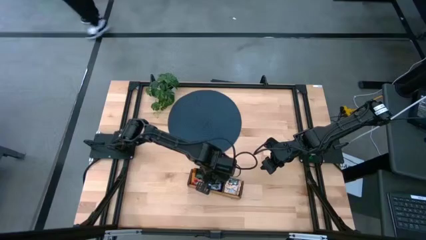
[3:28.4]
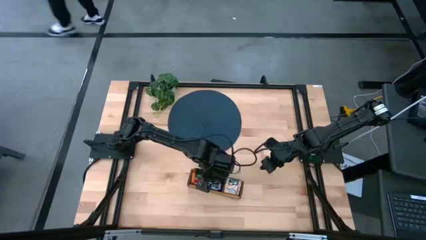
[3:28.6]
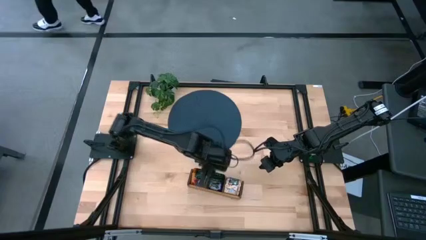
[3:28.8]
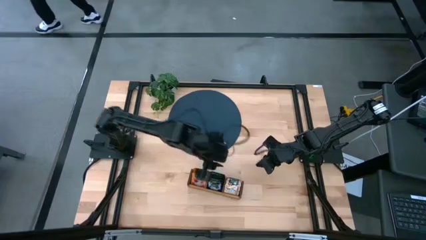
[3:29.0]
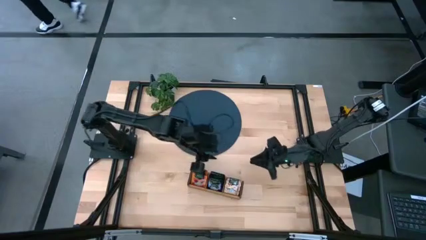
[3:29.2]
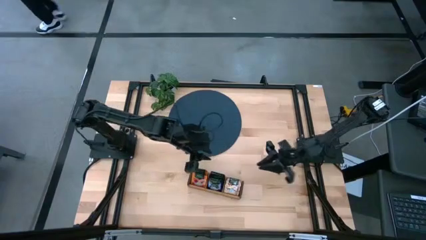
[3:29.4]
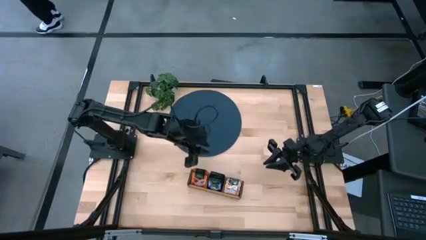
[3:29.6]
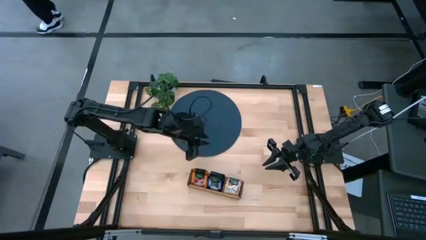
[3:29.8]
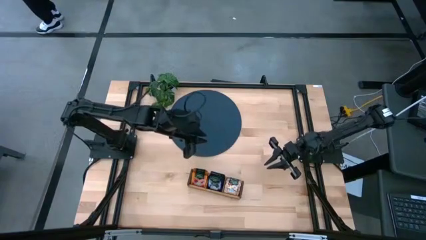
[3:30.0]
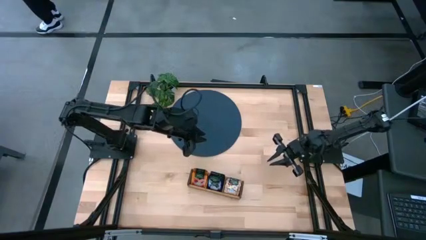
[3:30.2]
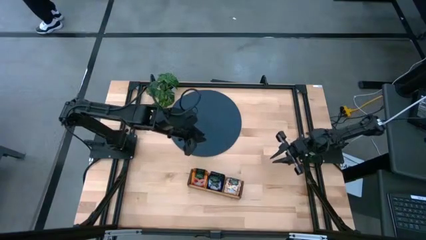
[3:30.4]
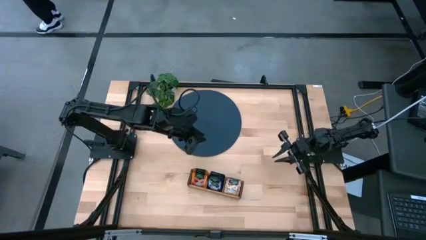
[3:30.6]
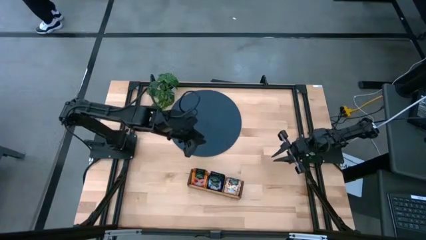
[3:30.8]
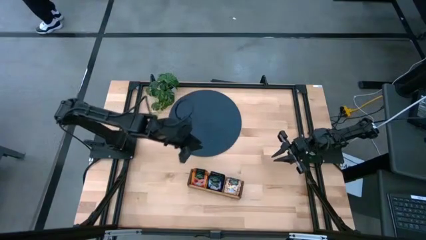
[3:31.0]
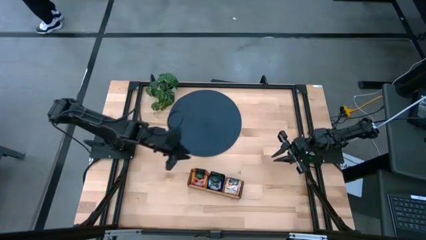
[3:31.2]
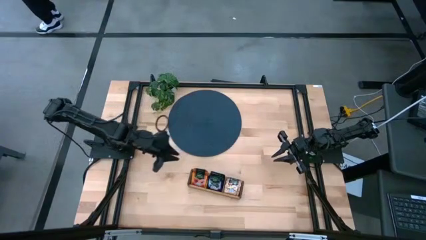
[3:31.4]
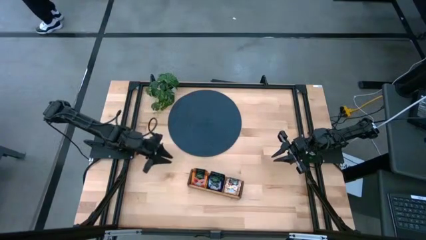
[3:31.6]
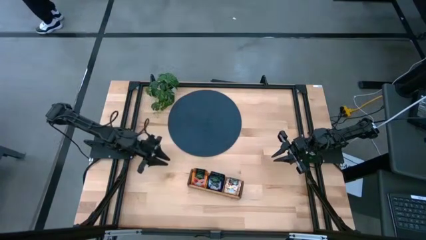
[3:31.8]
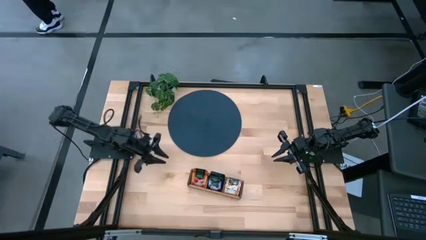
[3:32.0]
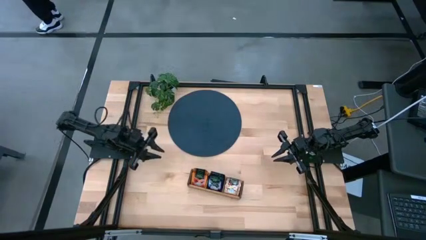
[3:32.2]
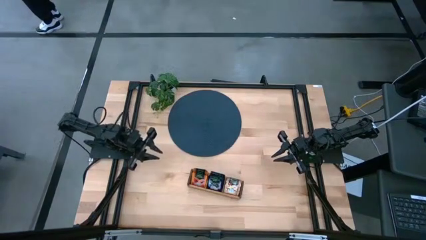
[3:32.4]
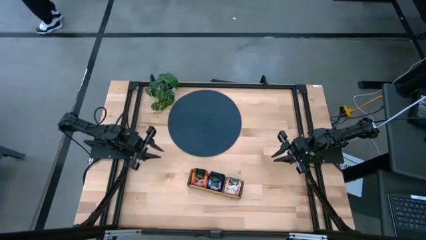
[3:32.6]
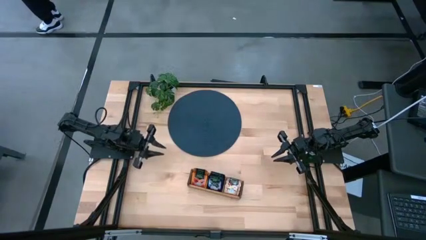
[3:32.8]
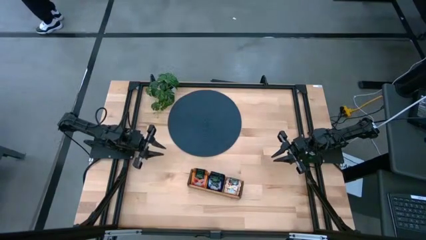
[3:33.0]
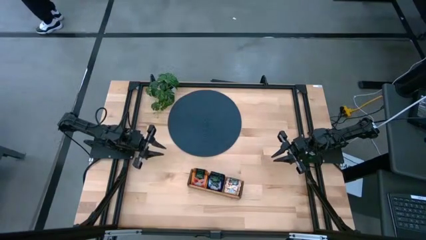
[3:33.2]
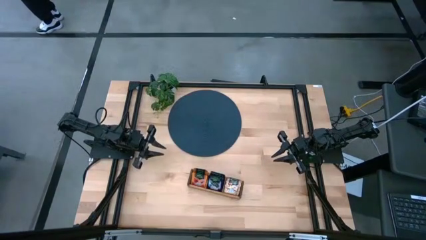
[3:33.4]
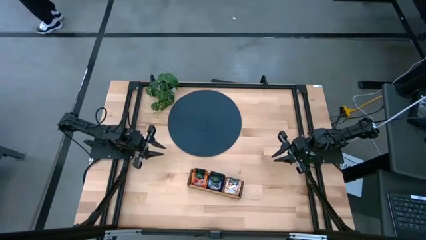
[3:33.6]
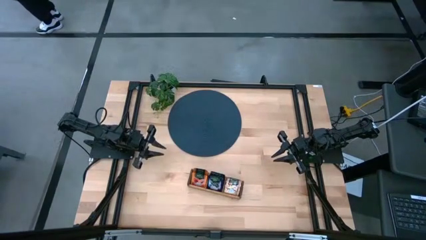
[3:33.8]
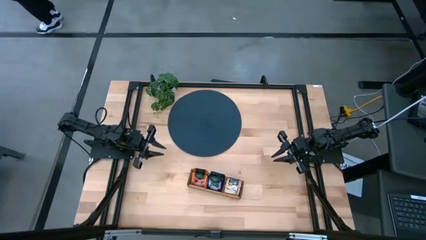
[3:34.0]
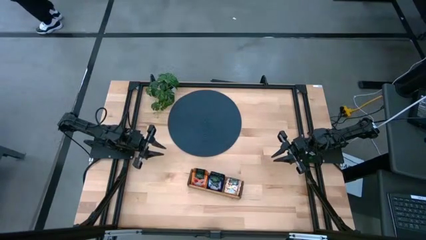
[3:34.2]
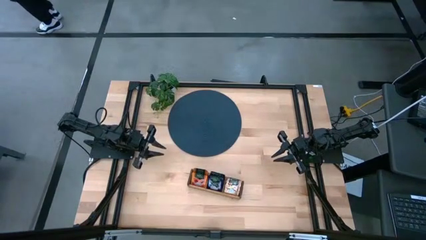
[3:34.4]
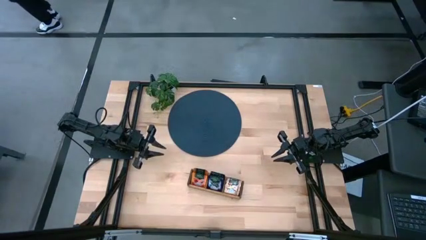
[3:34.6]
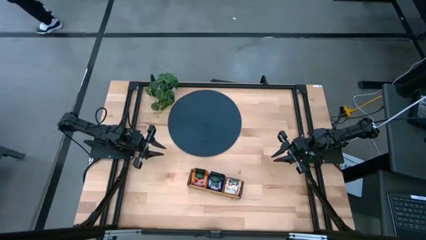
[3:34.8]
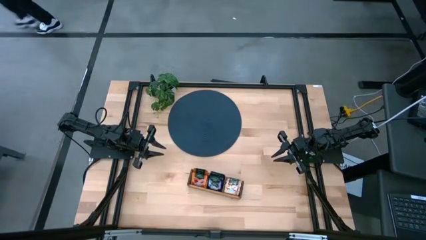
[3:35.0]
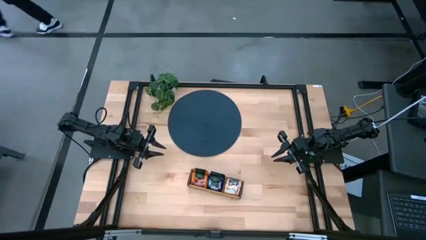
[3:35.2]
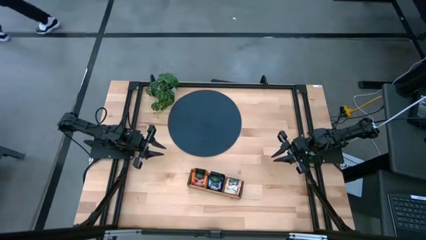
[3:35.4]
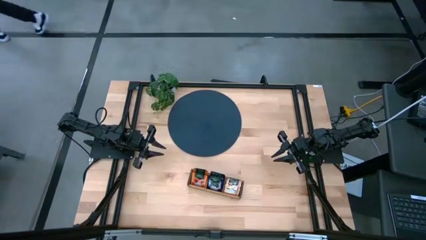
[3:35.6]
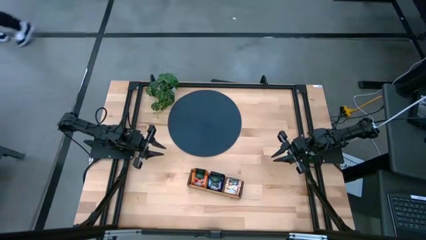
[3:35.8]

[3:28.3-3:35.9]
Task: Pick & Place Tea
Return to Home Position

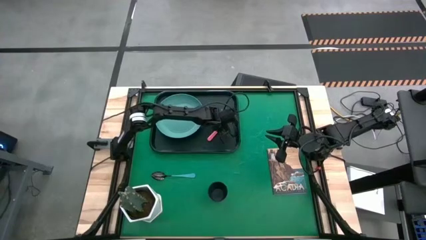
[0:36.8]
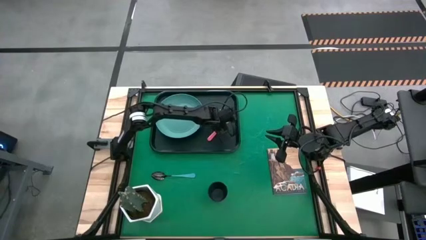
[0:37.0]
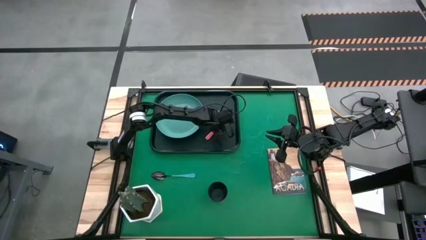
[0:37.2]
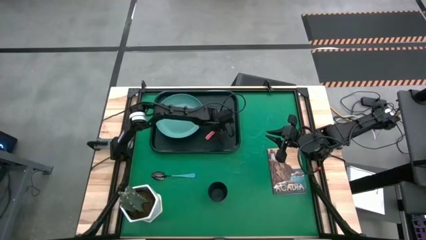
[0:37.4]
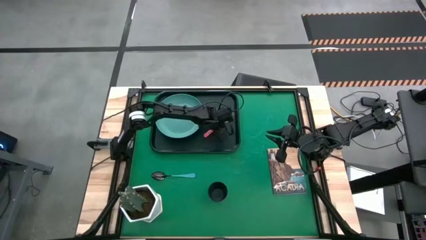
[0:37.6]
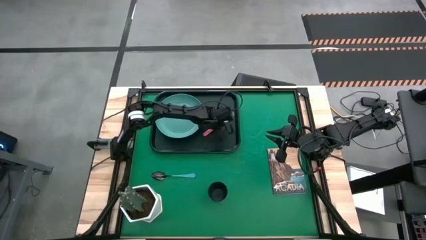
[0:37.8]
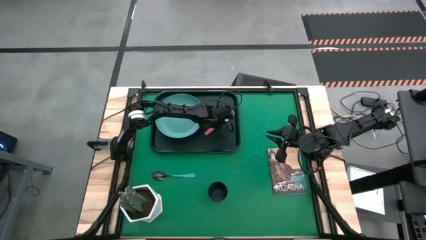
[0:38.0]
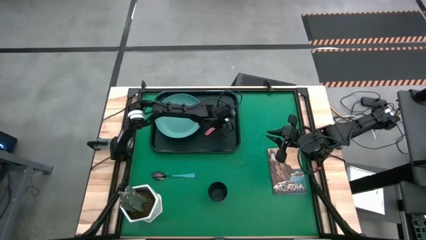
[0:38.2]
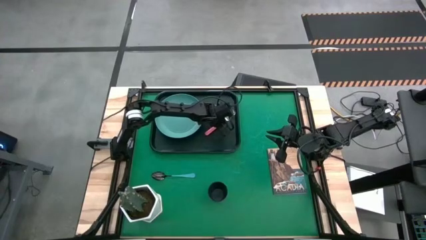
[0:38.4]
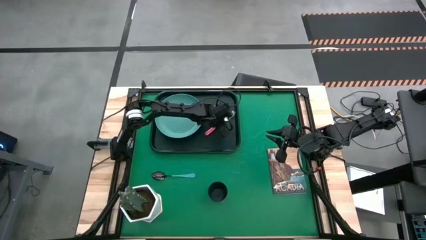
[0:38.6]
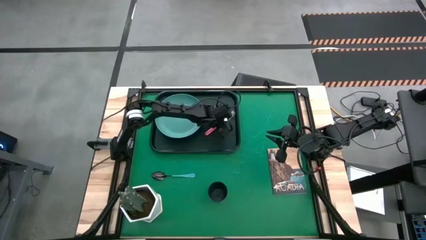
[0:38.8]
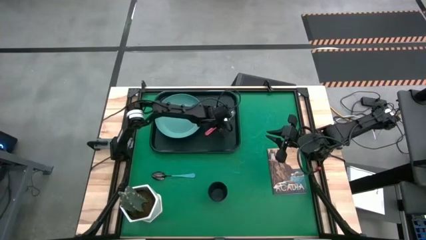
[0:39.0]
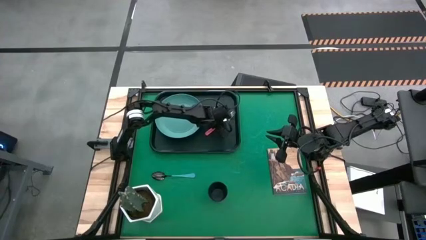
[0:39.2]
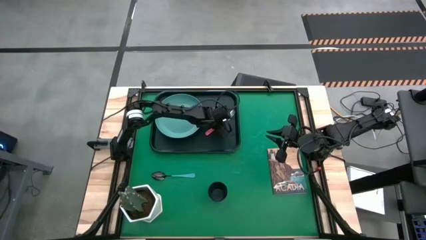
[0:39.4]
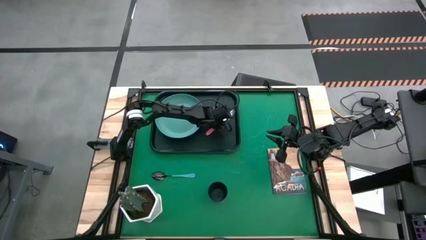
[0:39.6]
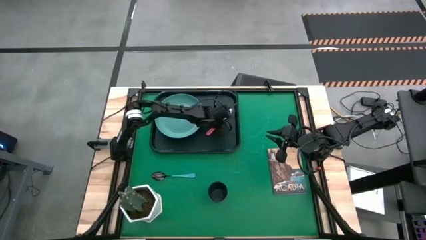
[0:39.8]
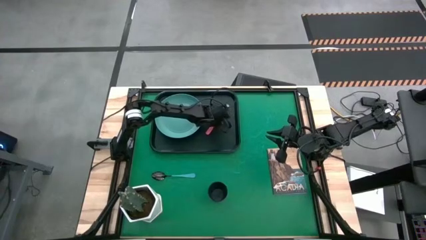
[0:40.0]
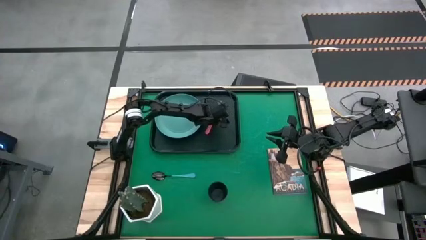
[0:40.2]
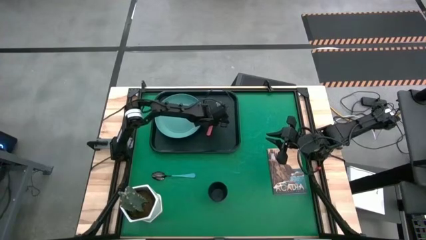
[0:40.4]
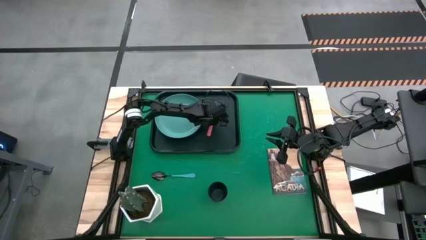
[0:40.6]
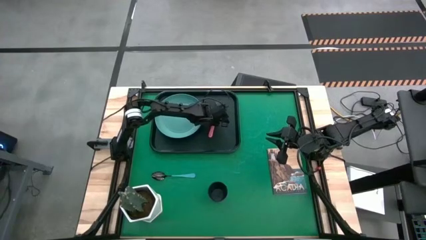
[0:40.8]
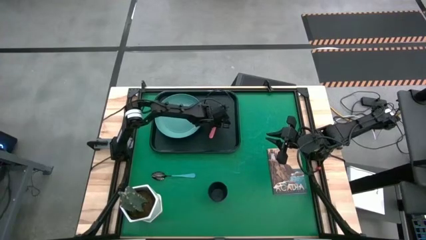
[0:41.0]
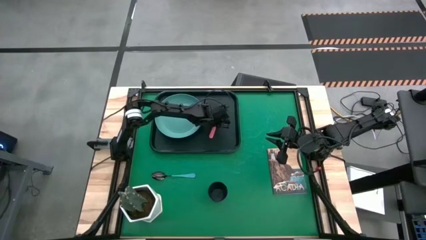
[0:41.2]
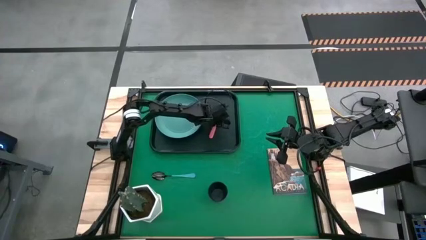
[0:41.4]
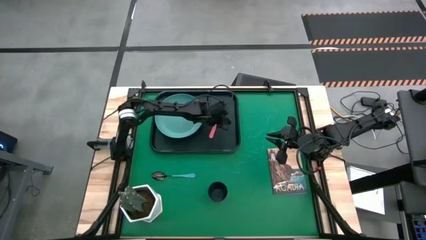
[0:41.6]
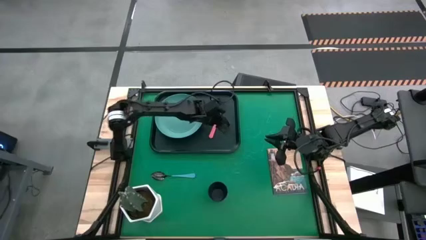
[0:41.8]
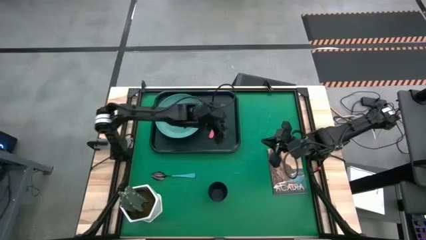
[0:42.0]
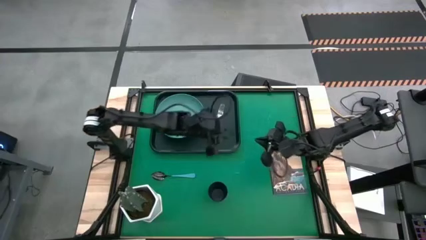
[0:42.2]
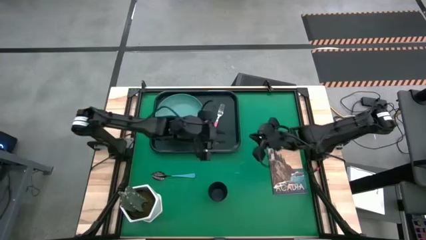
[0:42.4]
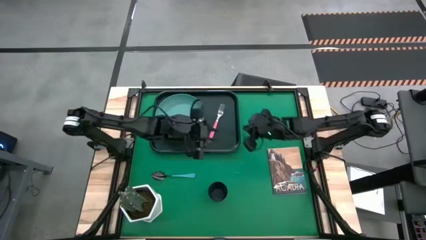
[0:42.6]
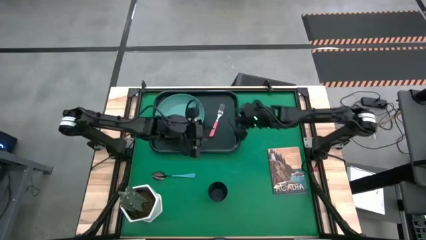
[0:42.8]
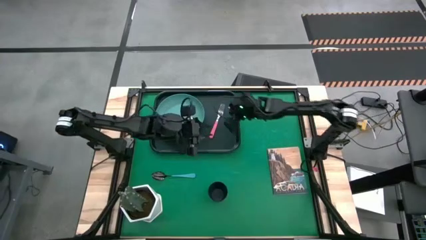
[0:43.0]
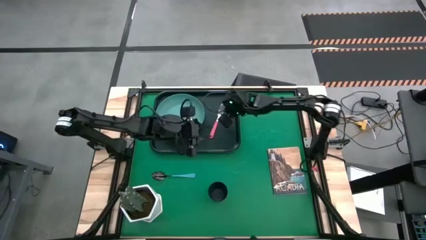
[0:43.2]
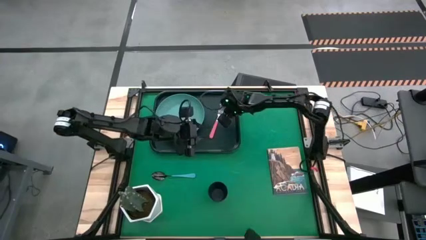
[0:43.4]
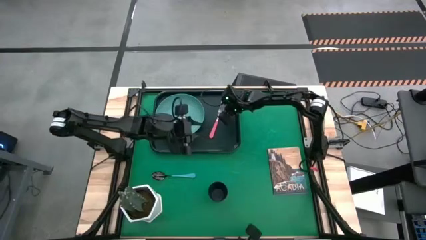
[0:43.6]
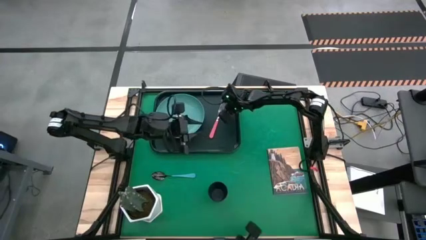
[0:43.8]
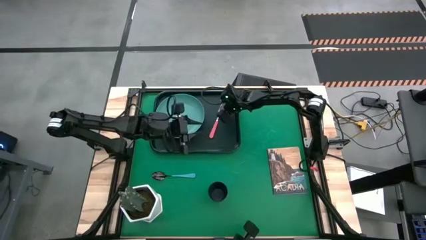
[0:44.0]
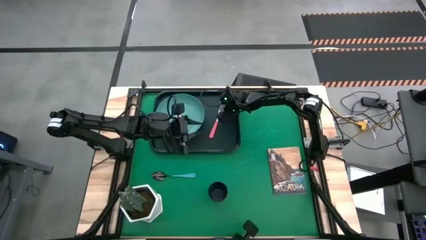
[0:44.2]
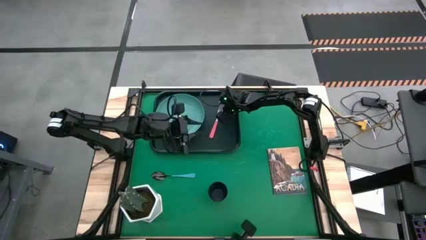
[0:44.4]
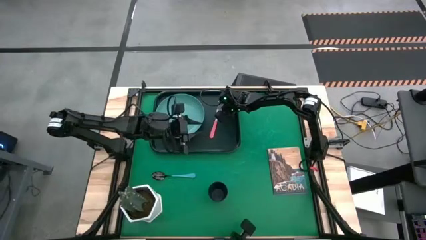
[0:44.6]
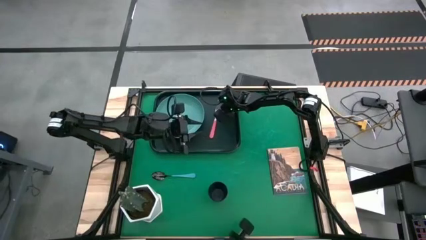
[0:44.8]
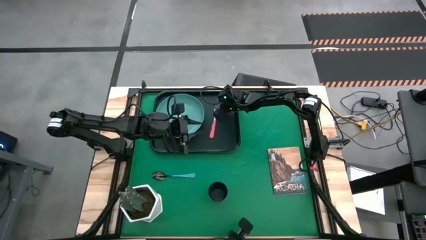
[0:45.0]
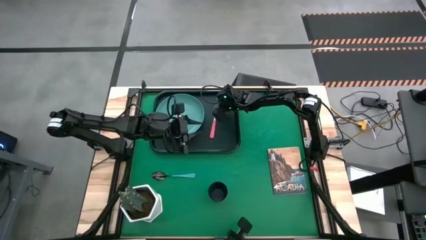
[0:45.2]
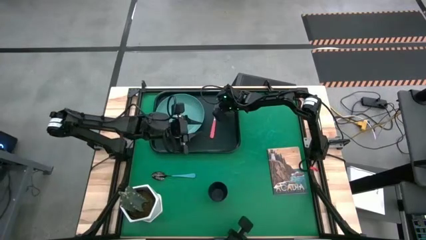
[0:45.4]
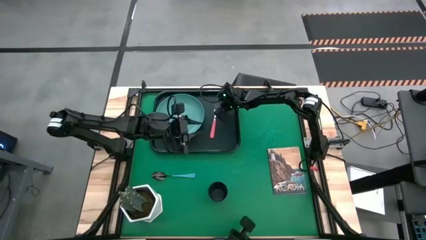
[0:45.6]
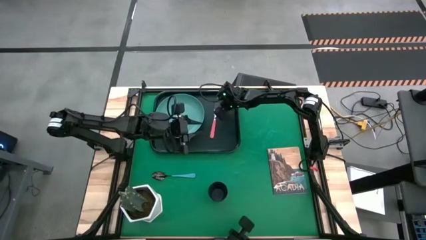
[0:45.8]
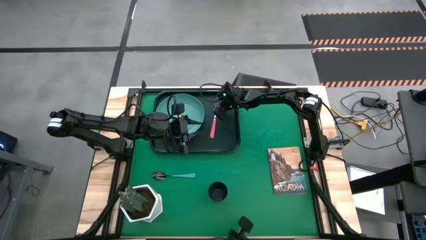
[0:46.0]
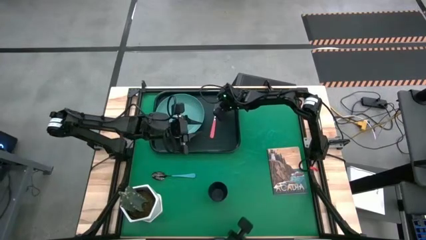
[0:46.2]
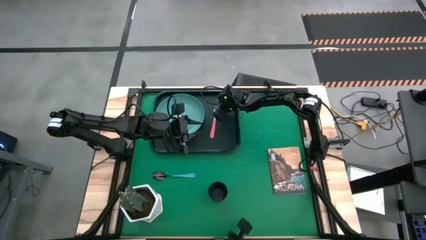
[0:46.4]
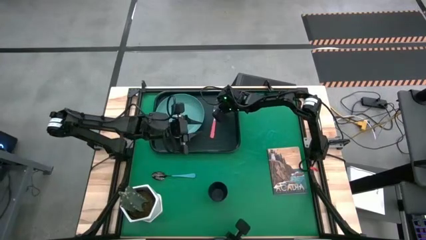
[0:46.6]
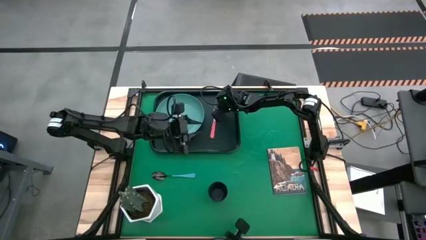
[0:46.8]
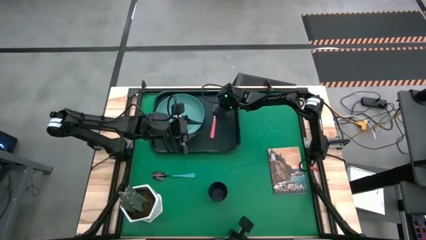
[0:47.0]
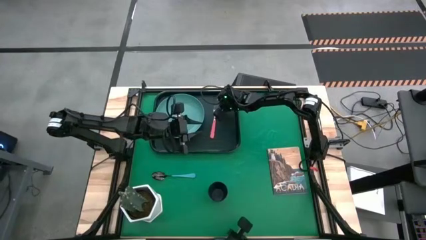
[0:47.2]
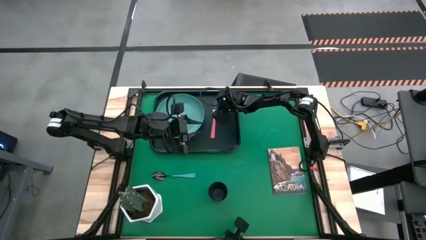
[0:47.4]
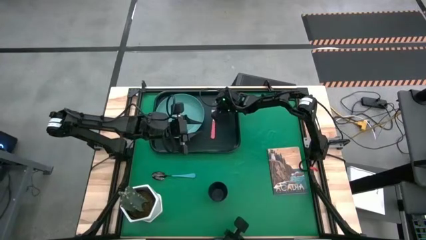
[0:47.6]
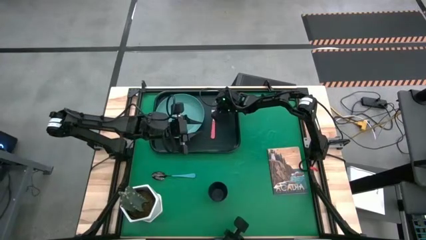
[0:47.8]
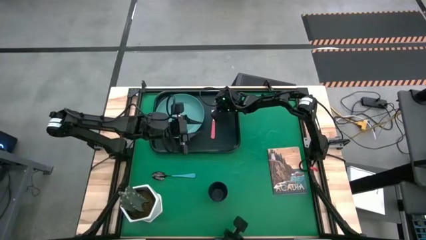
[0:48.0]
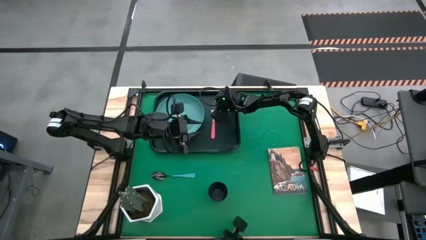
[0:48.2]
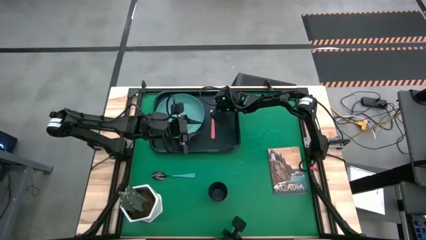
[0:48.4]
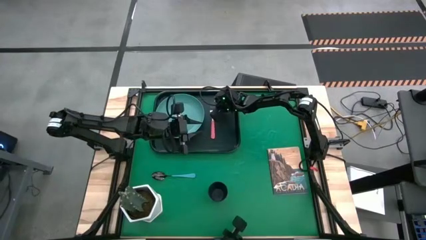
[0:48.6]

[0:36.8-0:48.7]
Task: Pick and place plate/cup/fork/spoon on tray
Put the pink fork on the black tray
